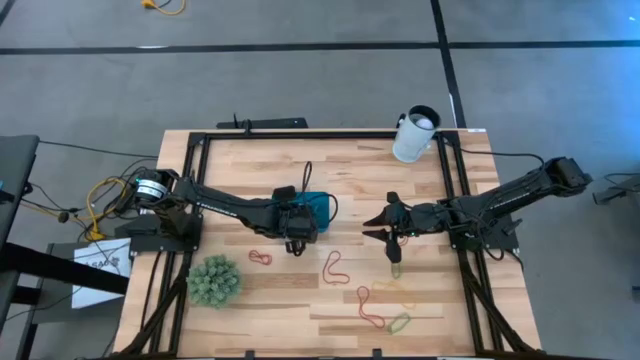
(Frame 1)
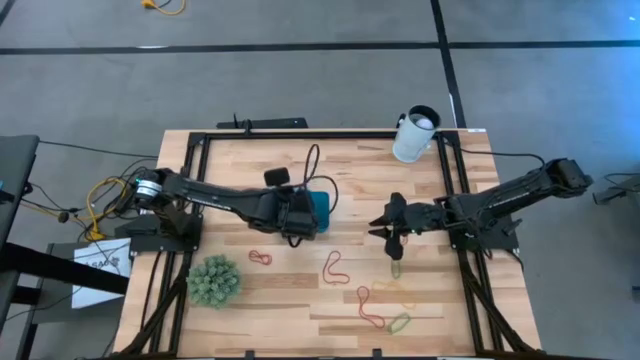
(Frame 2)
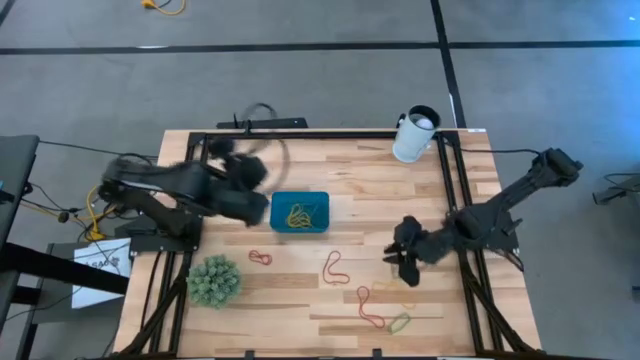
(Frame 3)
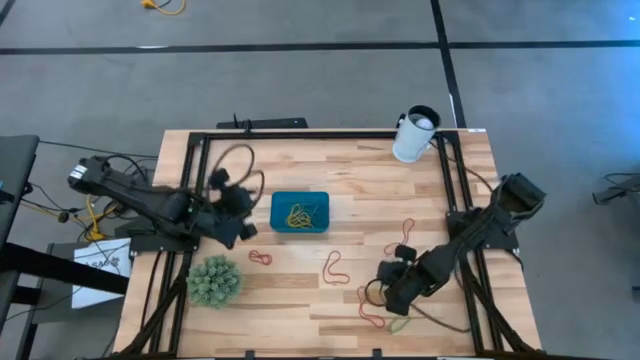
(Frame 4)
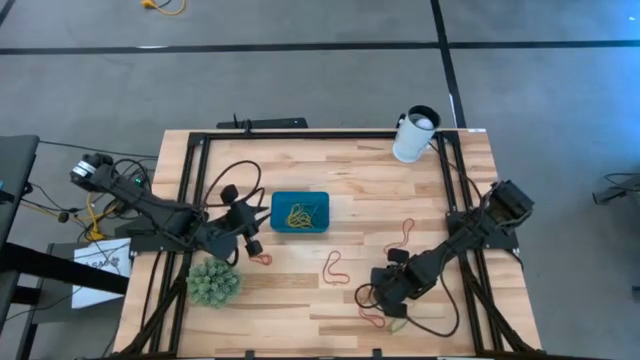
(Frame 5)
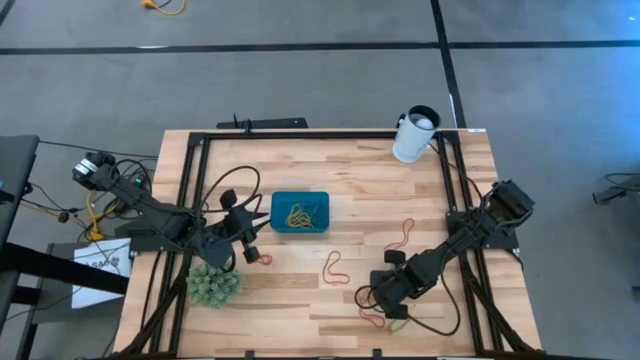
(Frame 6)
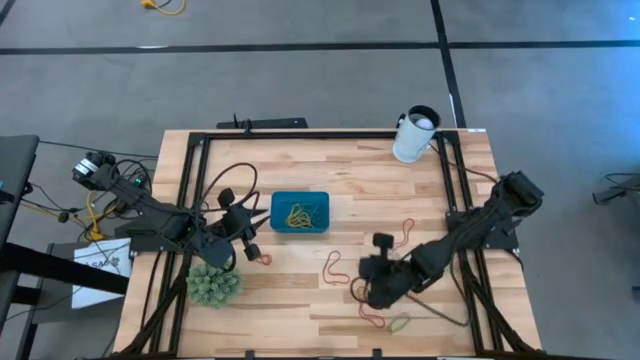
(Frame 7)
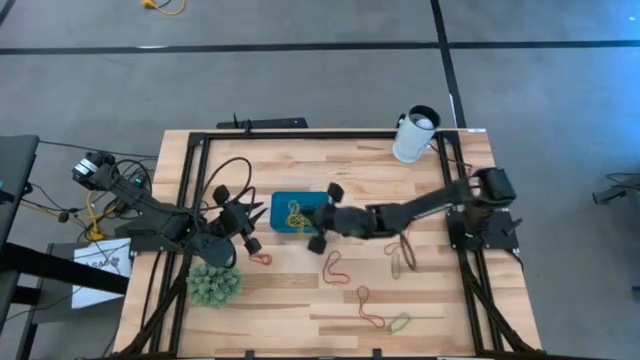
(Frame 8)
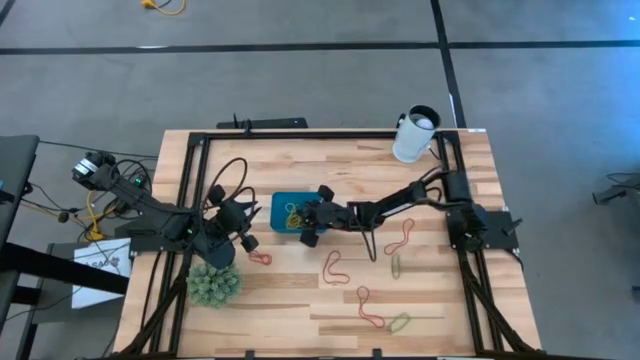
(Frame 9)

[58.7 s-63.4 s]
Task: Pick and place items into bin
Put the yellow rubber band into the blue bin

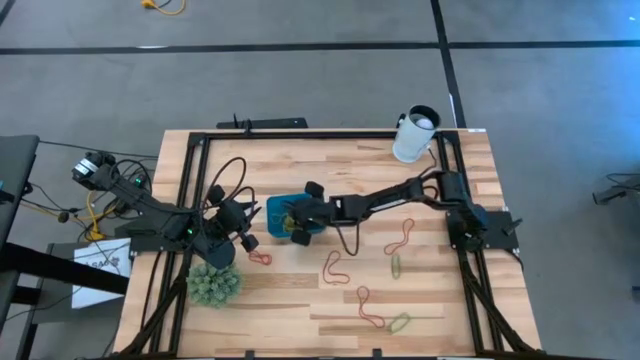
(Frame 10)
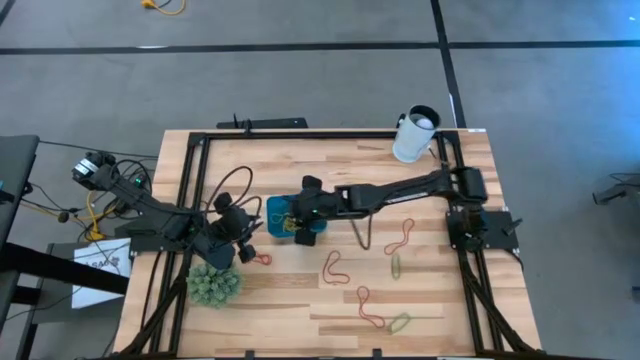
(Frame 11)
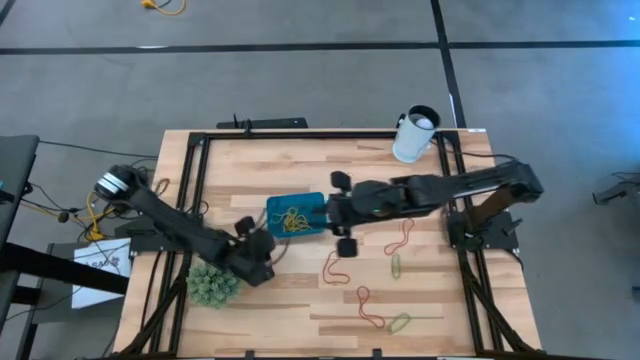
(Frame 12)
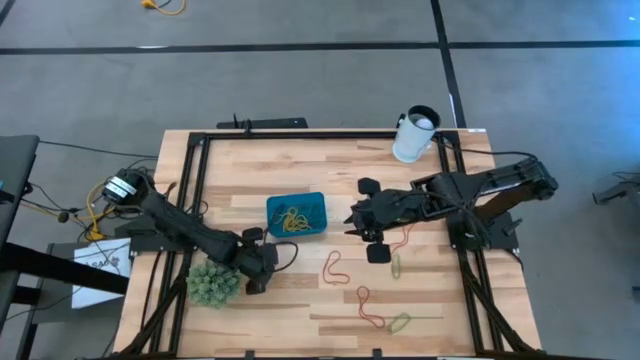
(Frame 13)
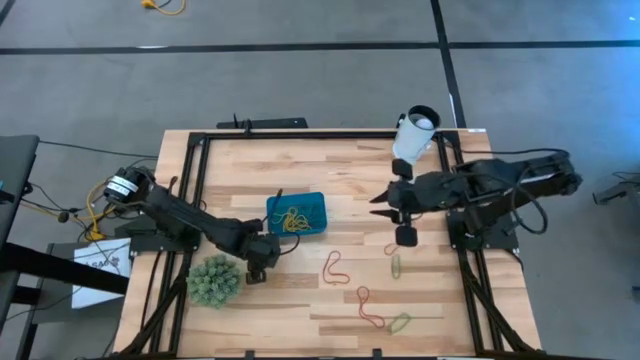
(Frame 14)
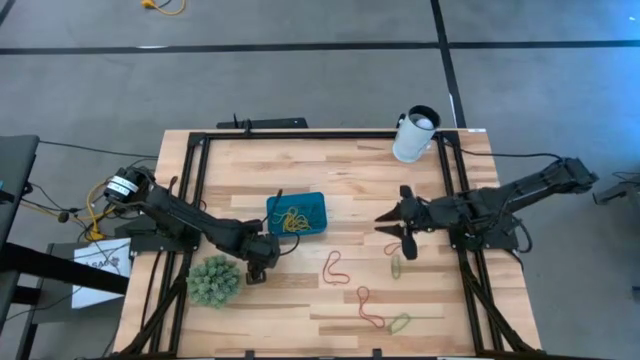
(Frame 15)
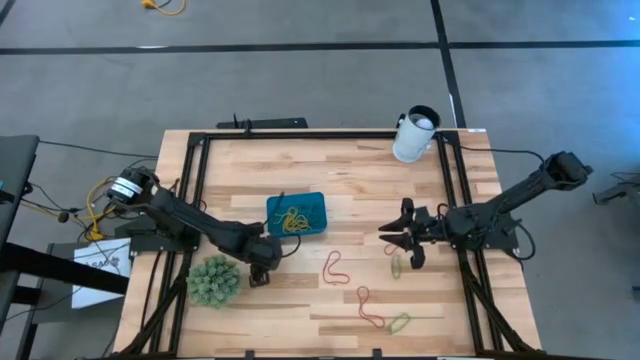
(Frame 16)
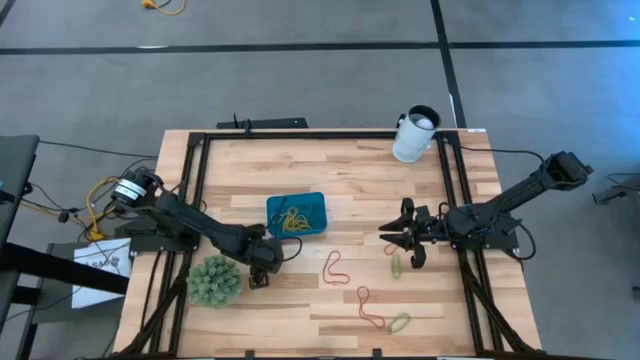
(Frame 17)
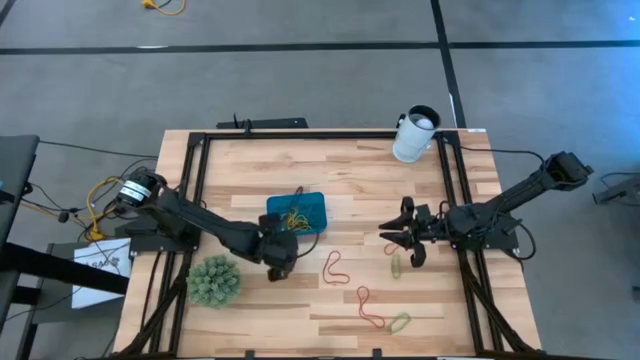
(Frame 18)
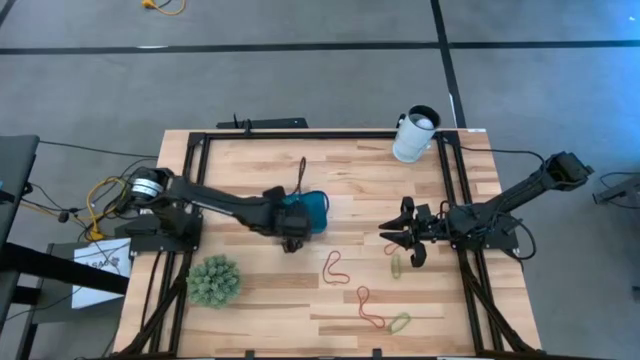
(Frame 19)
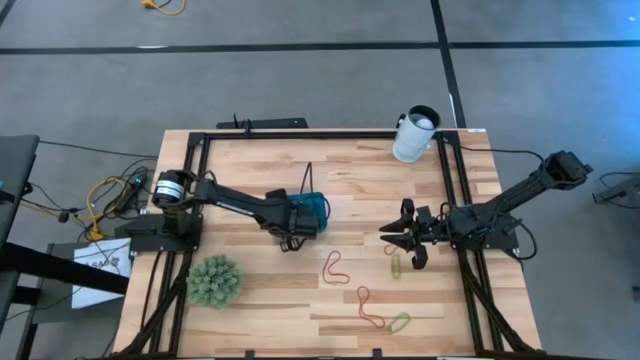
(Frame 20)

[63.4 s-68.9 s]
Put the red rubber band into the blue bin

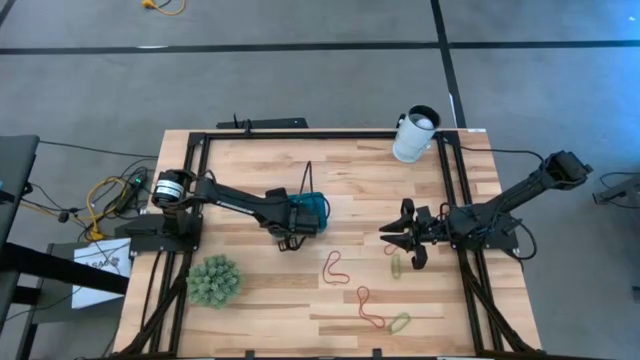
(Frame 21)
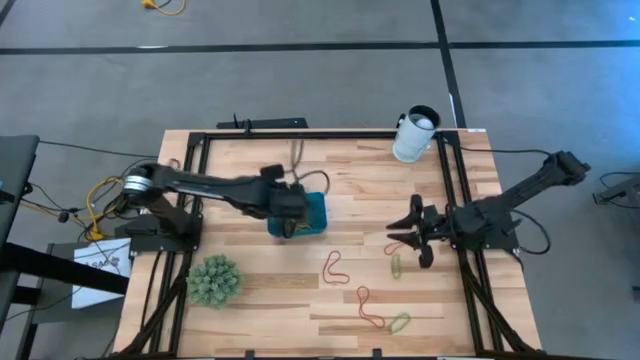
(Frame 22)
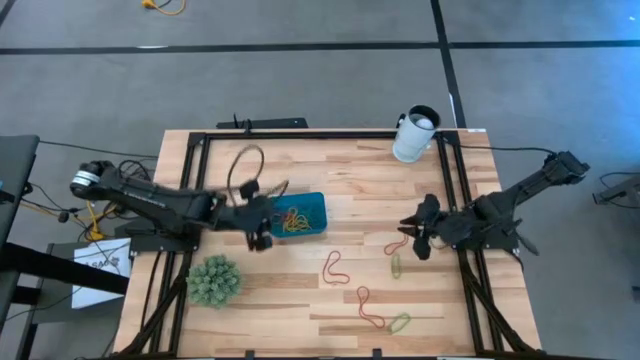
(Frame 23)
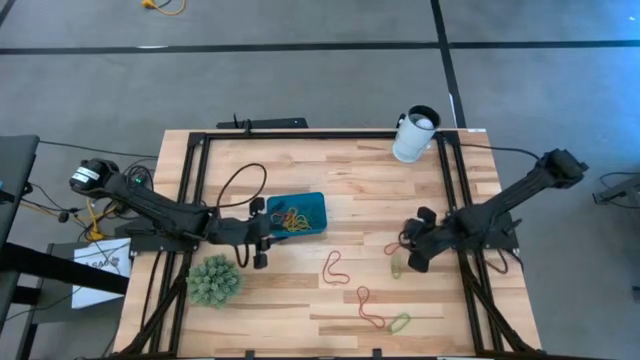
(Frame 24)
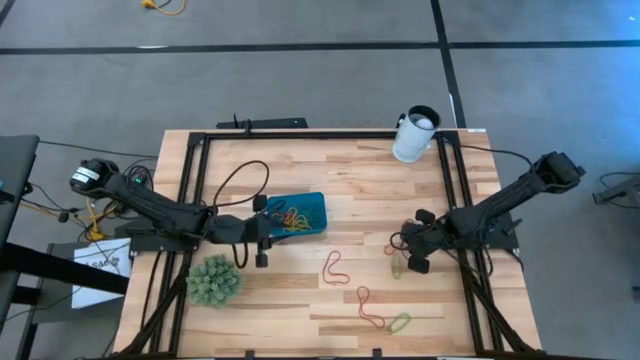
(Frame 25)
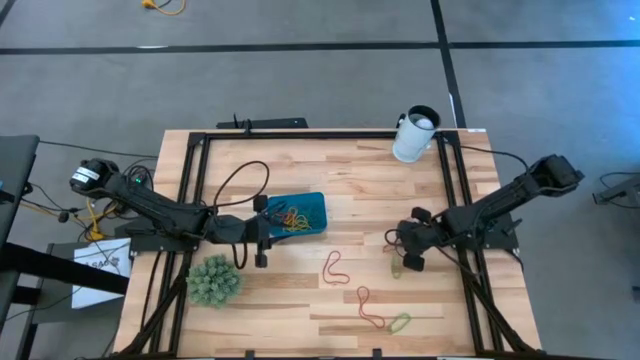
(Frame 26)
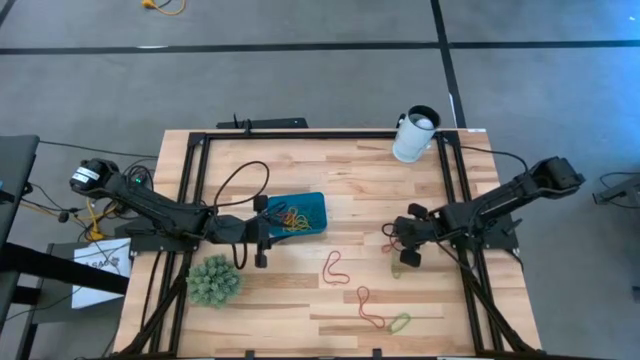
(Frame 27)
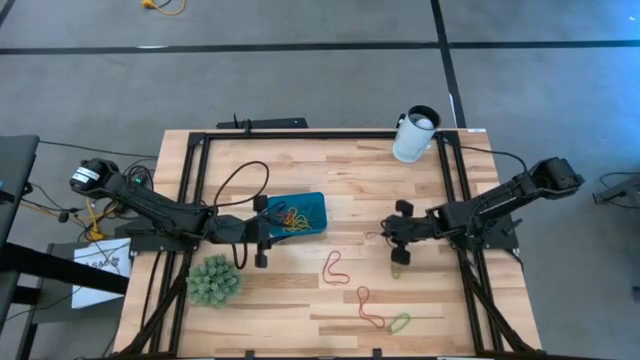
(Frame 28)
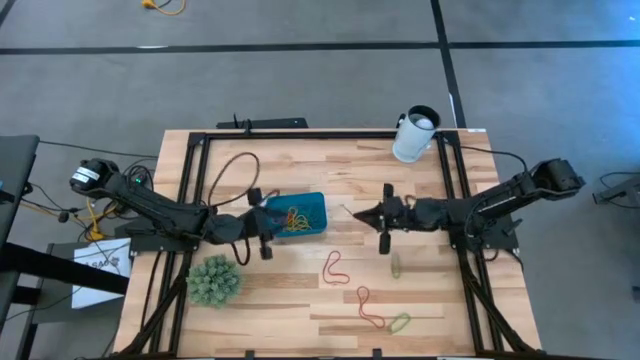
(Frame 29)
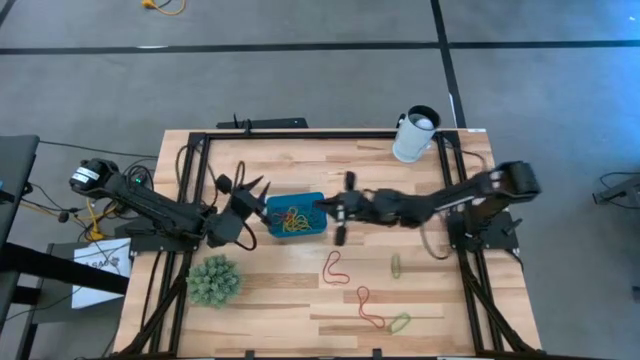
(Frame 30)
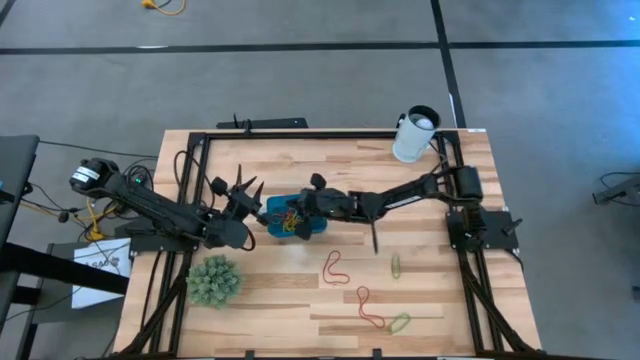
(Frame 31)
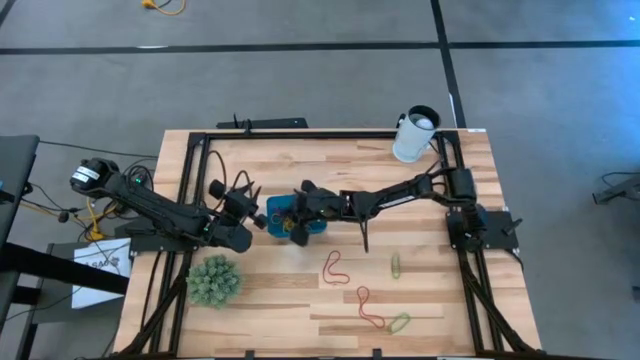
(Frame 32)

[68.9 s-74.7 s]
Put the red rubber band into the blue bin

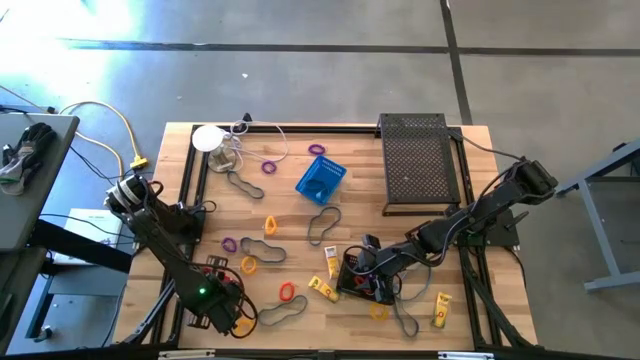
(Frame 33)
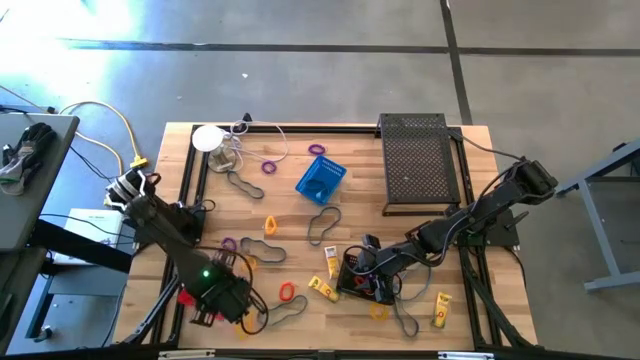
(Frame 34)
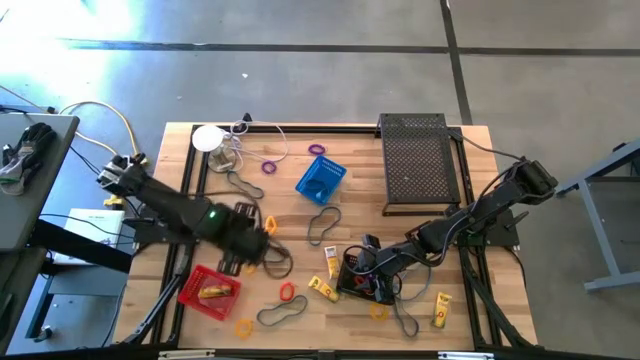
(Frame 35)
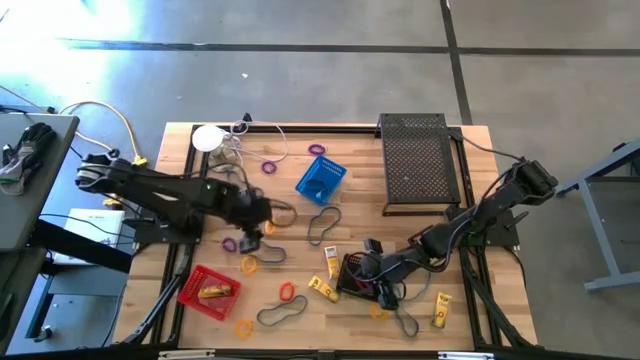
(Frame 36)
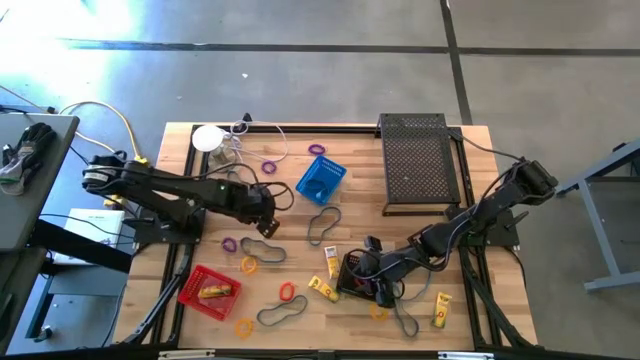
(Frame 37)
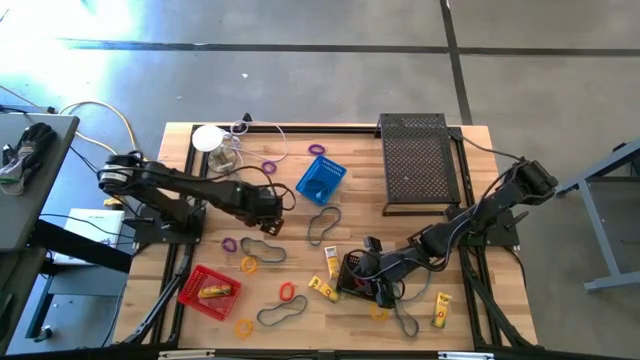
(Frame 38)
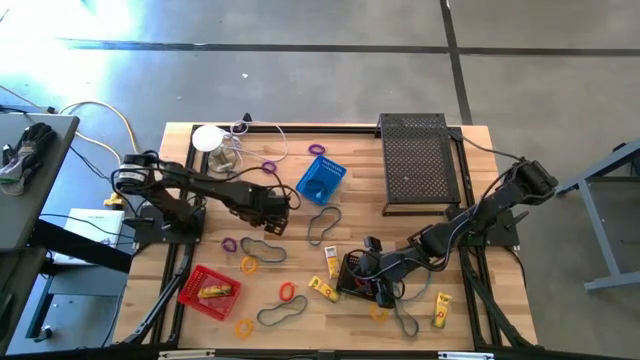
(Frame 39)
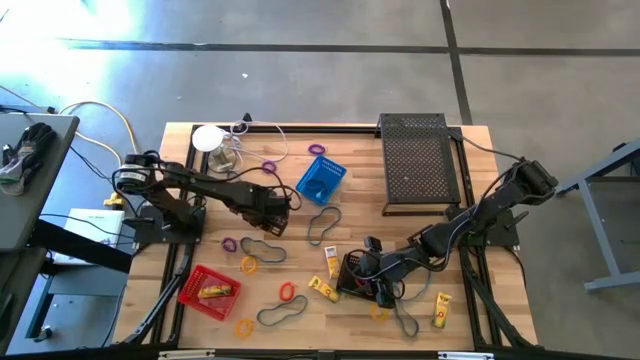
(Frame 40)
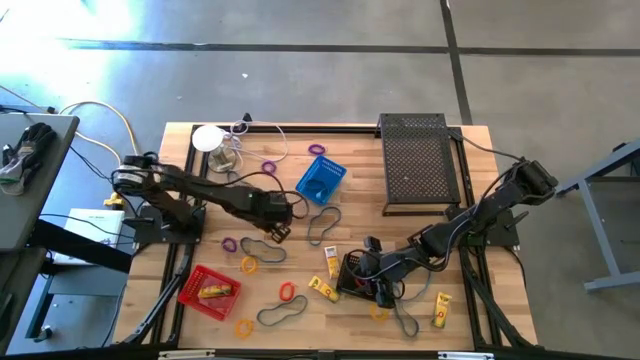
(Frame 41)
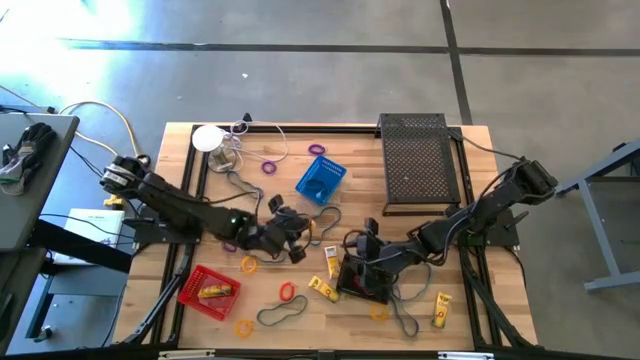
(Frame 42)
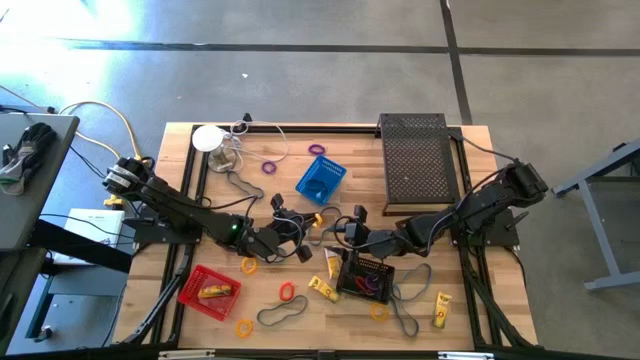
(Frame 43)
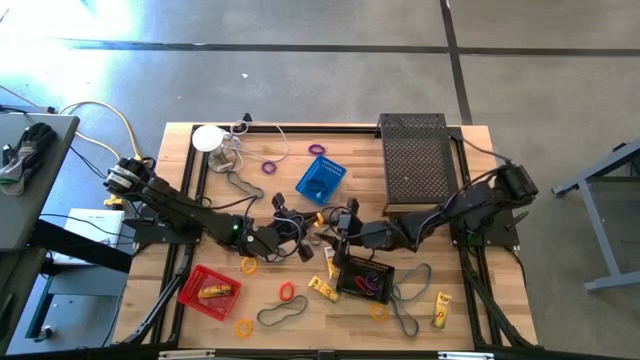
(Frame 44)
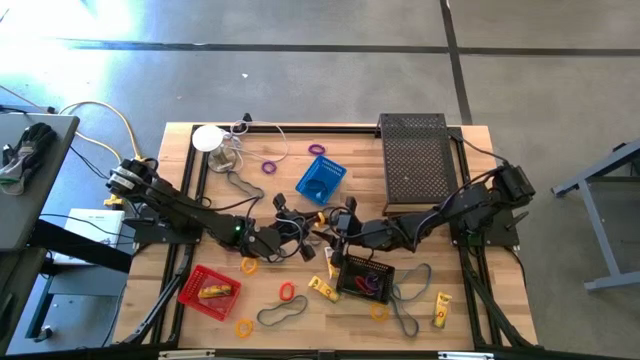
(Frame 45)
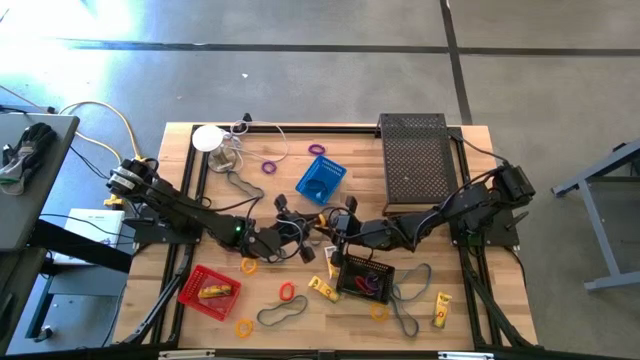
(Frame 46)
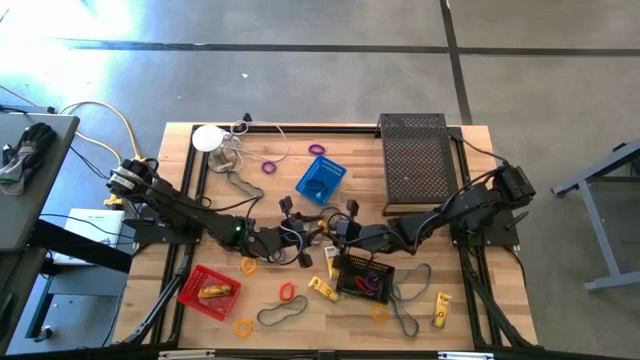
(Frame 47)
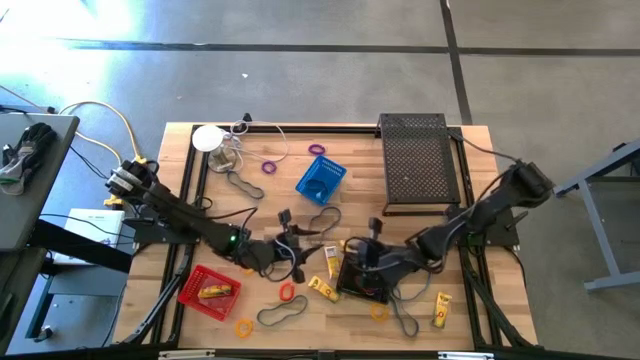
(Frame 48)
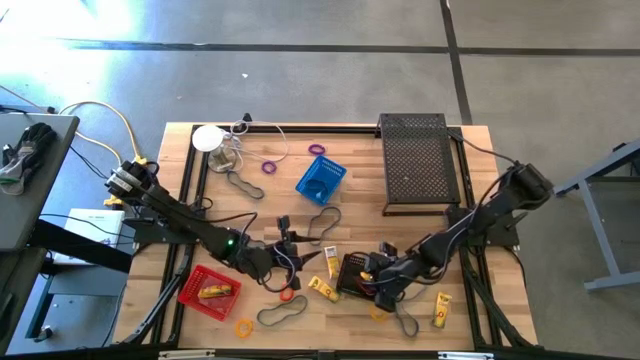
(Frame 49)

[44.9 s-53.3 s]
Task: Pick & Place Office Desk Supplies
Put the top yellow wrist coil keychain into the black bin
